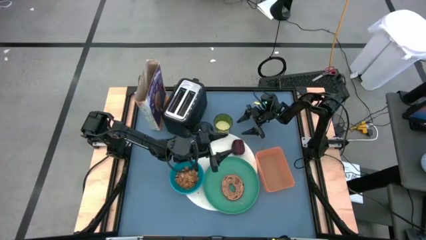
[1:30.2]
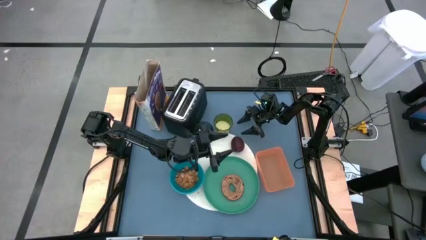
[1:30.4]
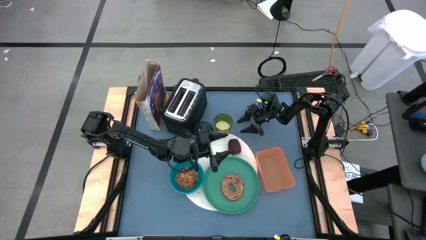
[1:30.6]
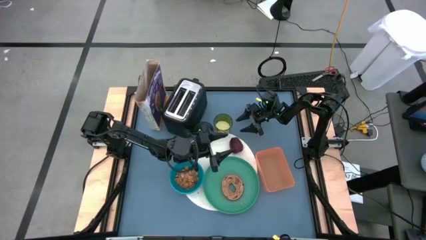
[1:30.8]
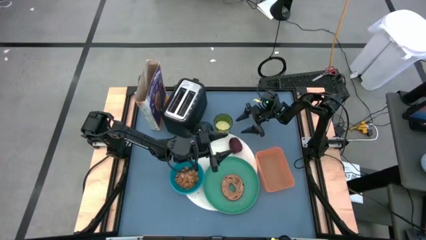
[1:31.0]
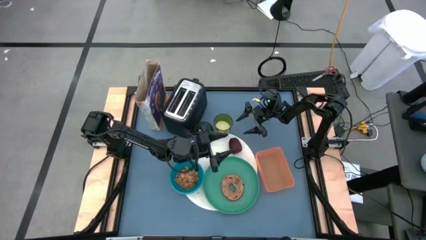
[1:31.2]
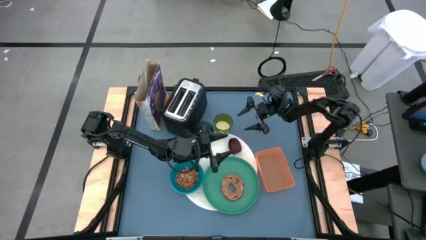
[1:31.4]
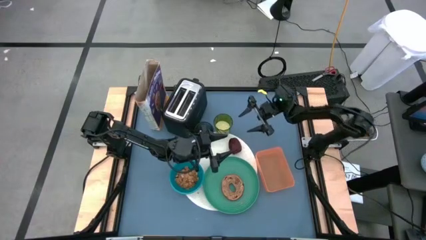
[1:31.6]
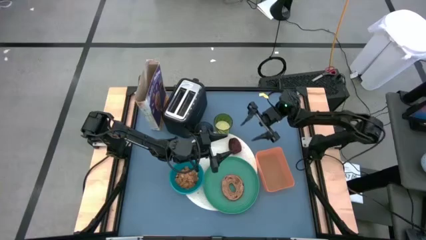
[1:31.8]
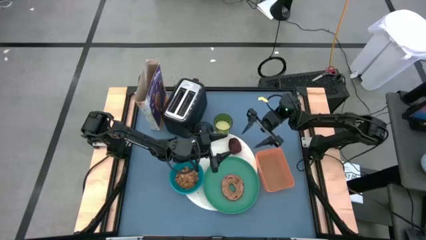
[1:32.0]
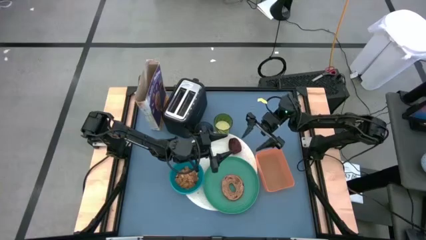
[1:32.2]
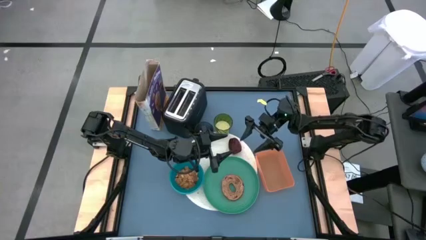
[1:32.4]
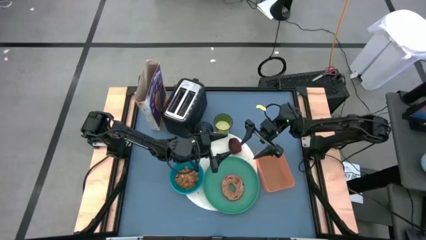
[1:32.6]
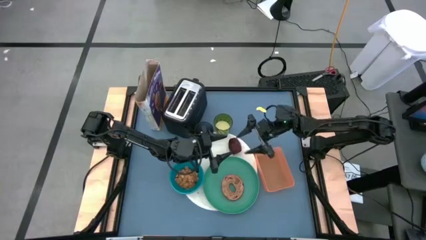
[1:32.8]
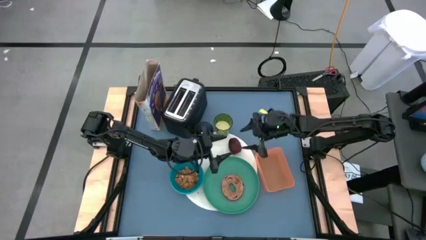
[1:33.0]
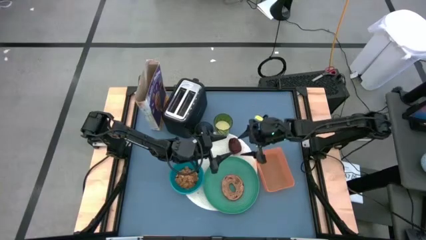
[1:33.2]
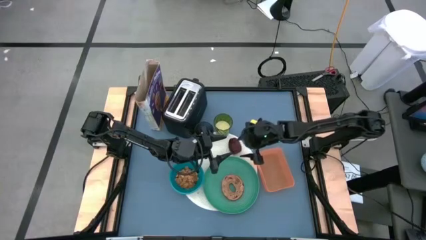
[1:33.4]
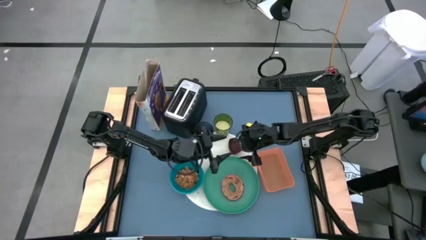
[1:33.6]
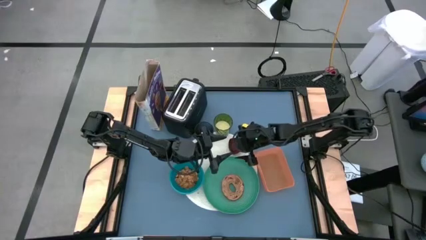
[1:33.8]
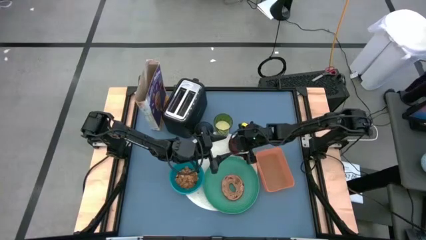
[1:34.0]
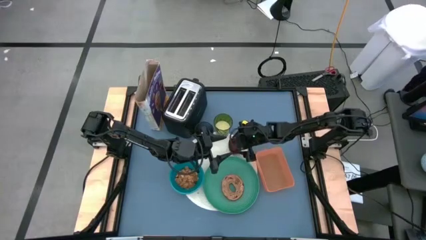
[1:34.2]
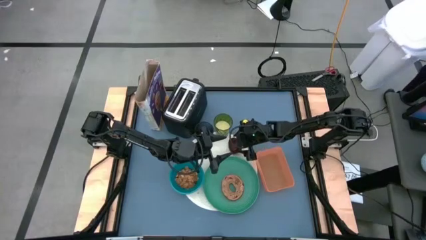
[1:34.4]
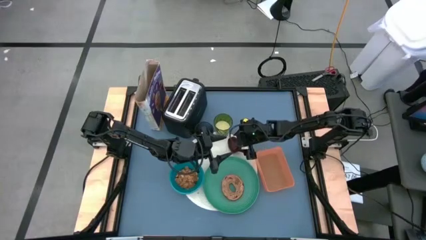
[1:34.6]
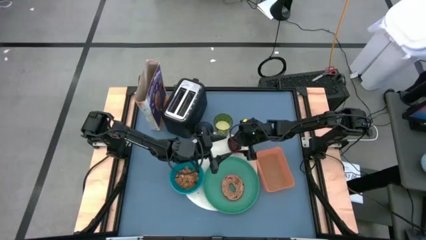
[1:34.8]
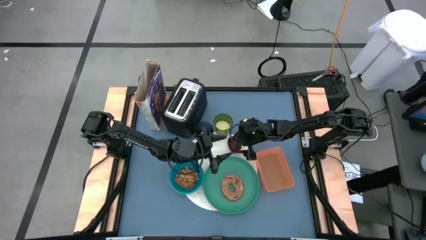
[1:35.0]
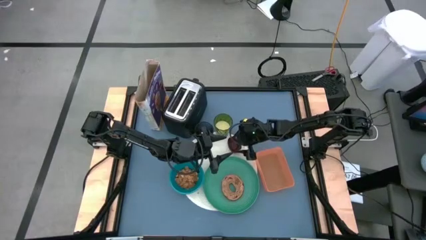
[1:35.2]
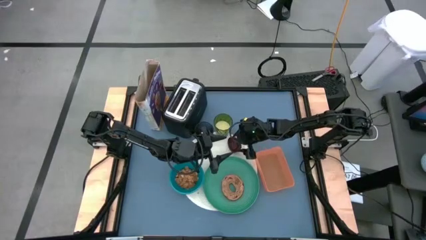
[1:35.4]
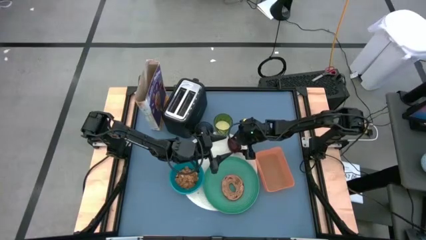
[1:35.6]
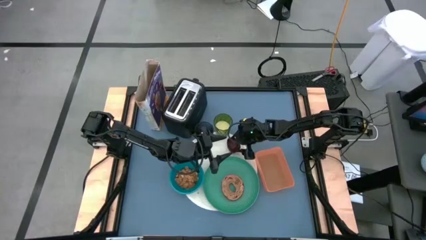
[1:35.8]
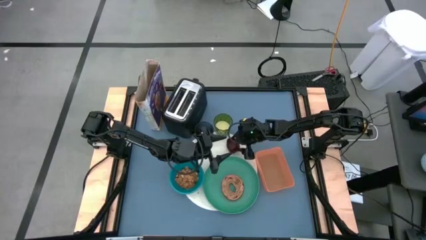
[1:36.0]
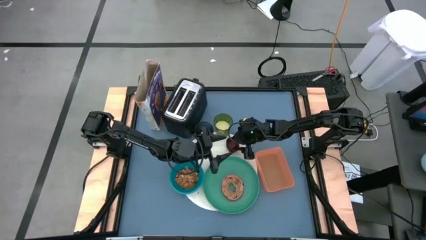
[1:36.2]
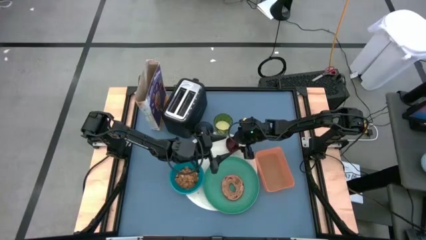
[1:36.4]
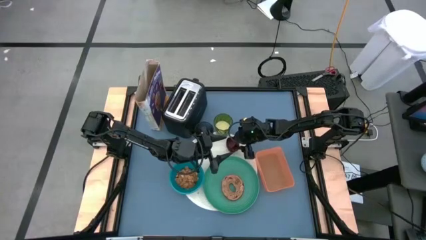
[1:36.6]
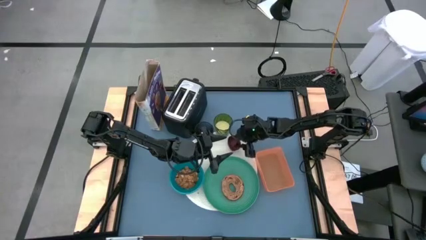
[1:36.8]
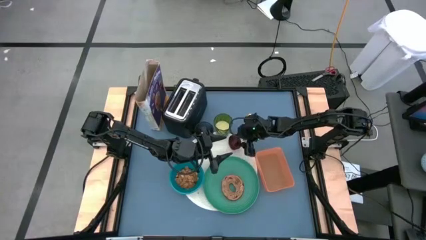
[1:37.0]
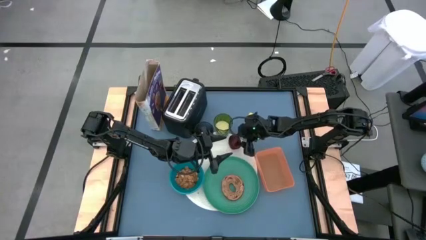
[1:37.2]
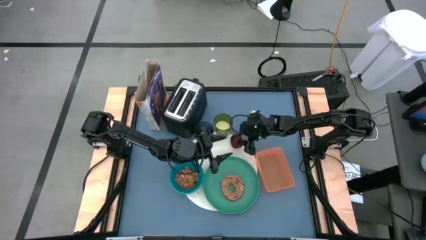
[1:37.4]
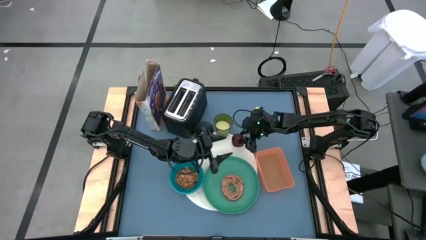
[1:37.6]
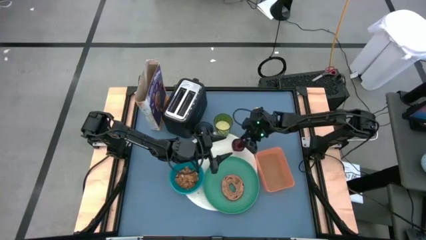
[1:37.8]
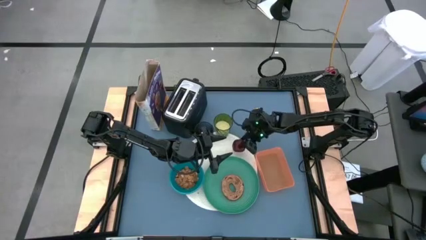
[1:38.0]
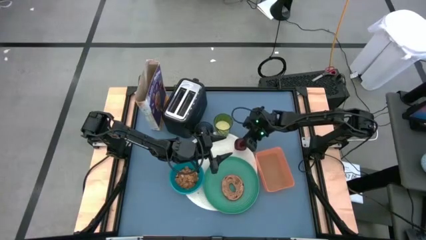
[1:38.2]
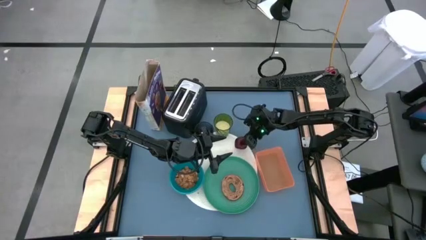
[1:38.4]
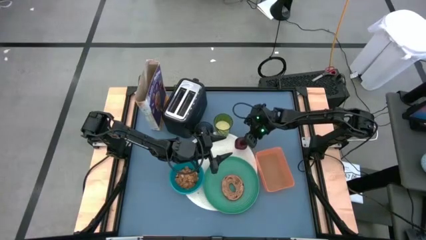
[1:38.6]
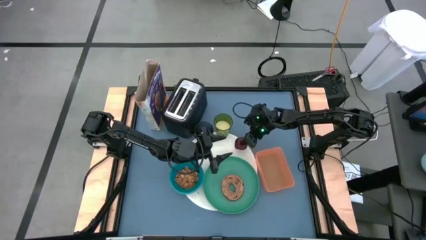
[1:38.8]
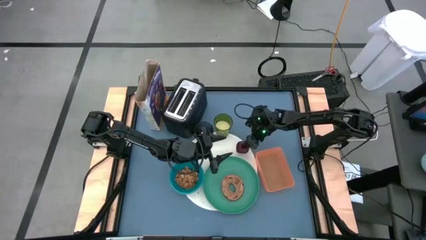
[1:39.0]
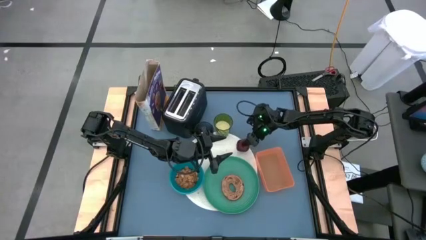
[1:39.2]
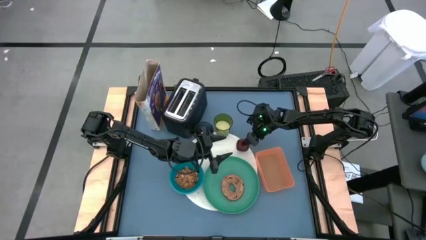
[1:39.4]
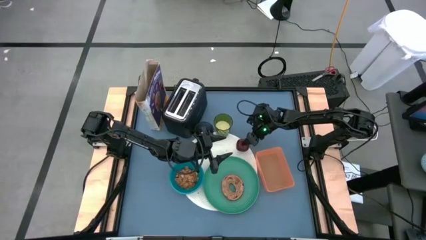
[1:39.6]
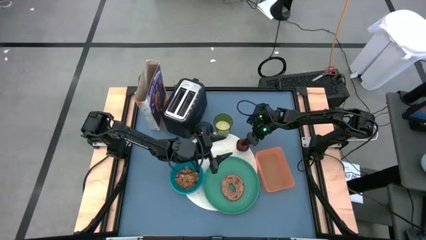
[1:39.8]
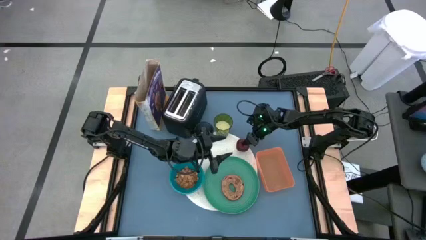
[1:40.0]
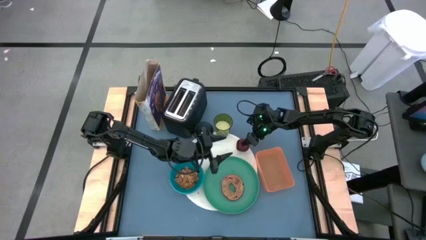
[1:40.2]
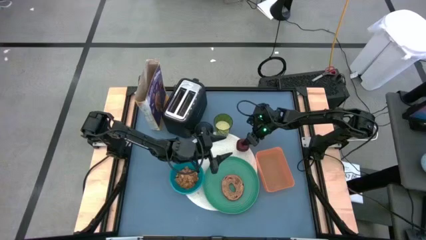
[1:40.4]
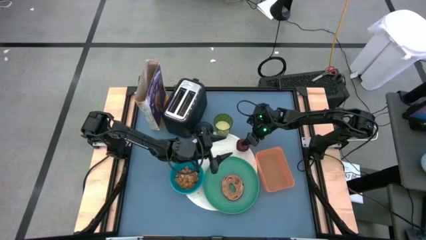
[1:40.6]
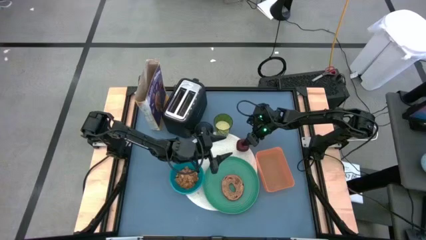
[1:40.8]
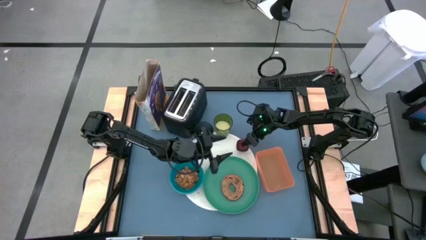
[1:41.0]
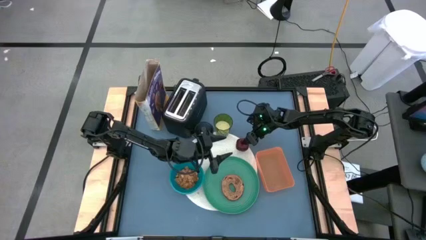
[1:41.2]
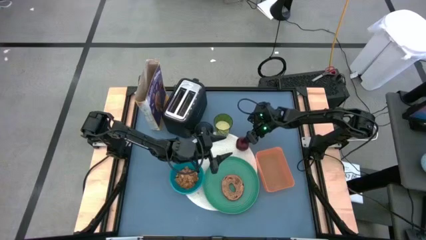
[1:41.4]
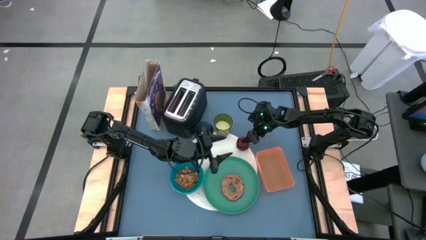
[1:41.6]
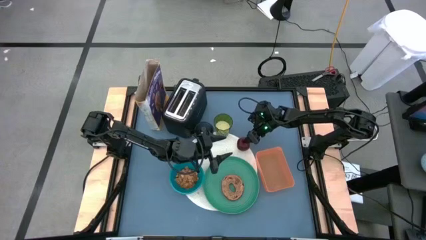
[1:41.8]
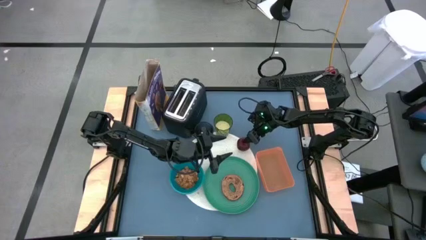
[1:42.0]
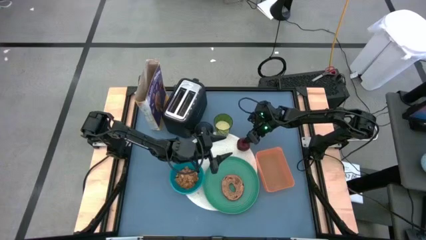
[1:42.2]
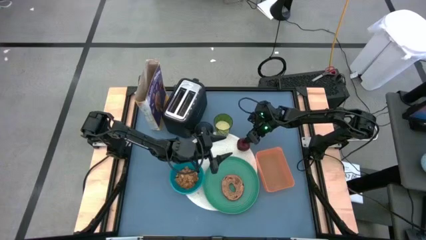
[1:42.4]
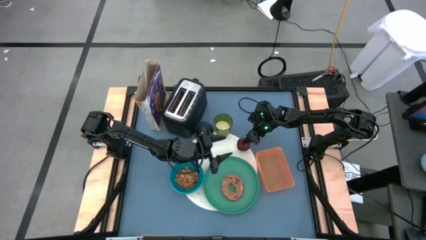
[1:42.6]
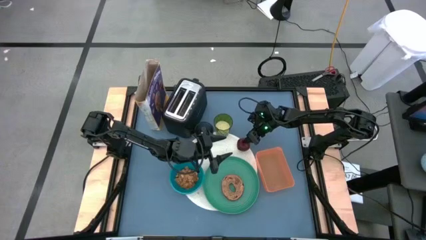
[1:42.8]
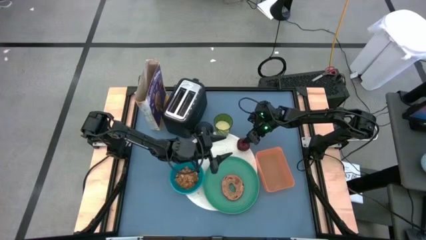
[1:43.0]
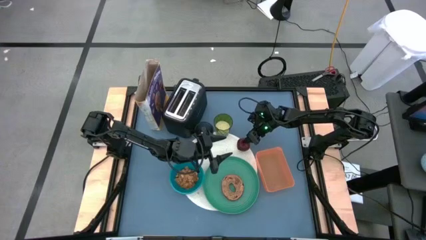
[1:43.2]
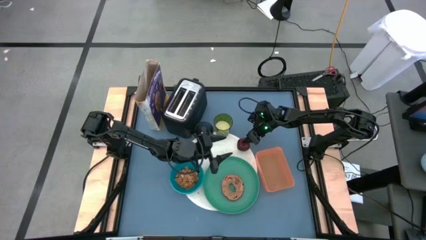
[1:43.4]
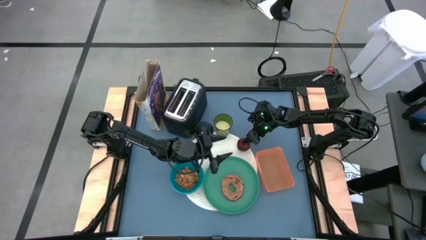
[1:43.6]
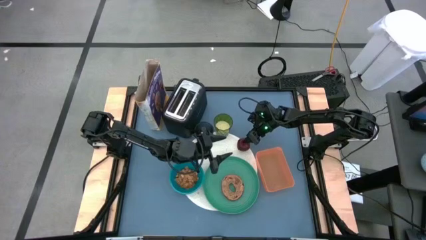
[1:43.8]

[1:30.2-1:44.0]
Task: Arrange a breakfast setting
Put the red apple on the white mat
